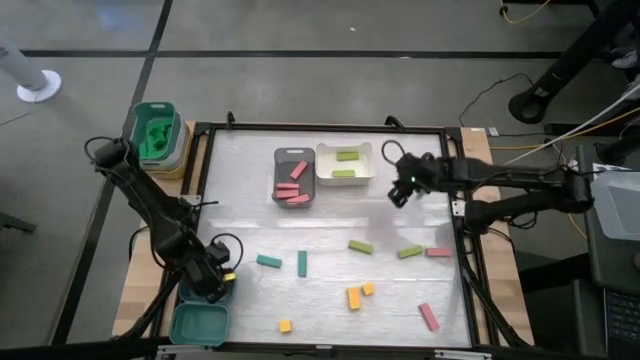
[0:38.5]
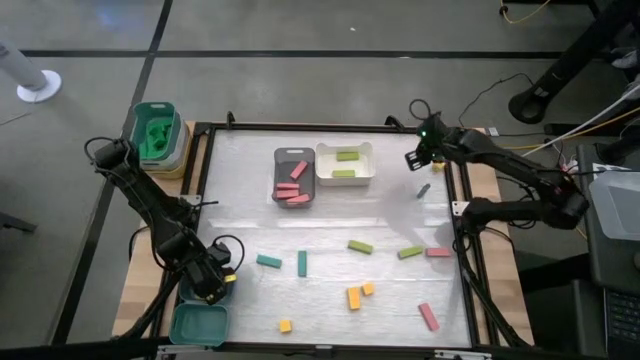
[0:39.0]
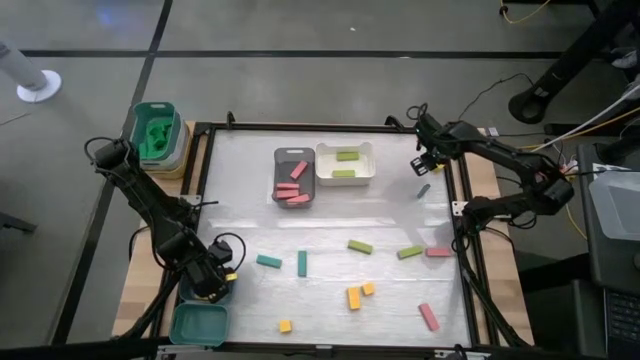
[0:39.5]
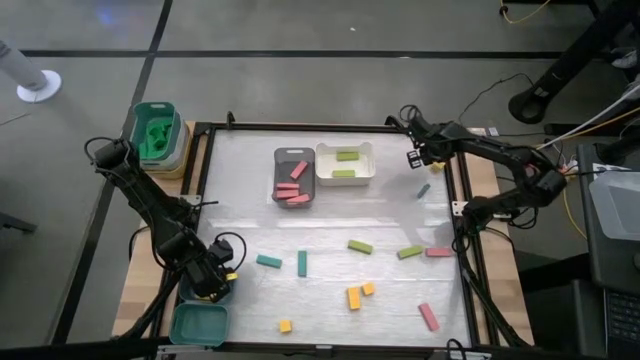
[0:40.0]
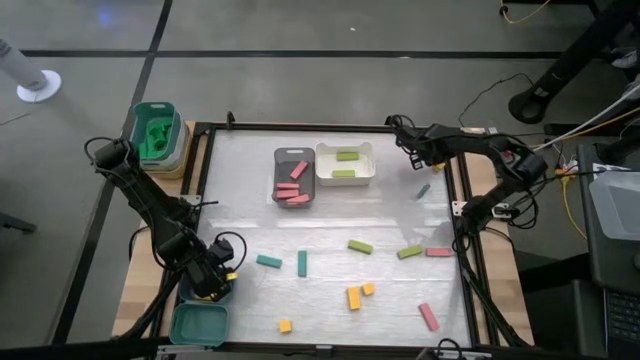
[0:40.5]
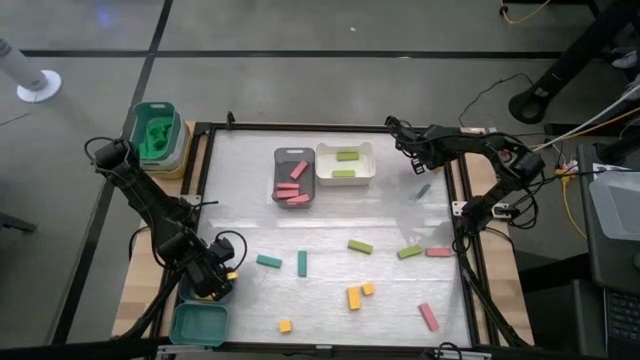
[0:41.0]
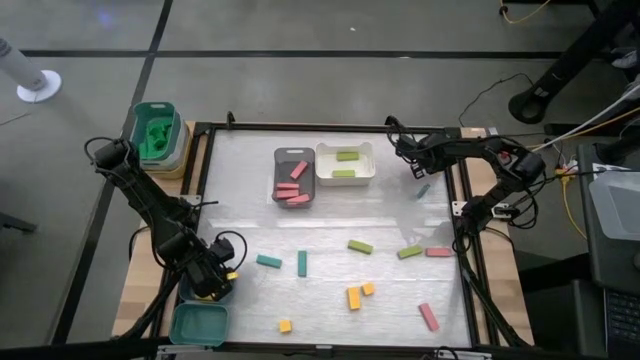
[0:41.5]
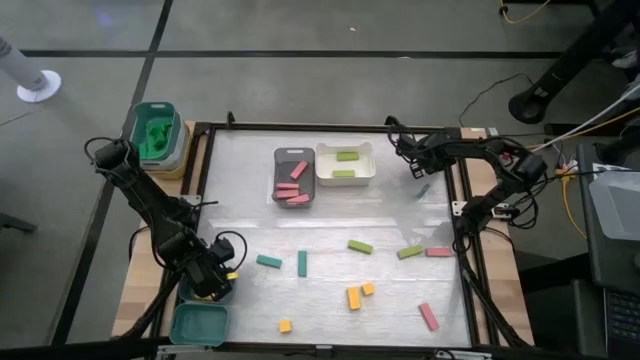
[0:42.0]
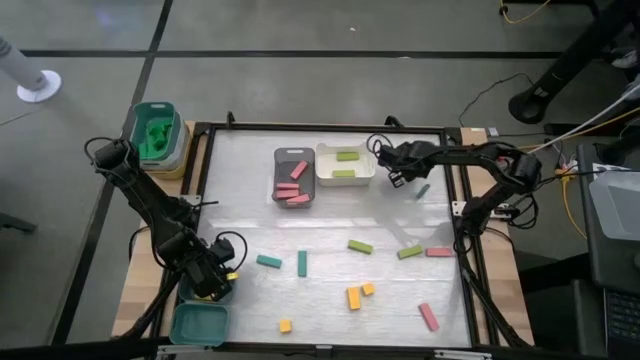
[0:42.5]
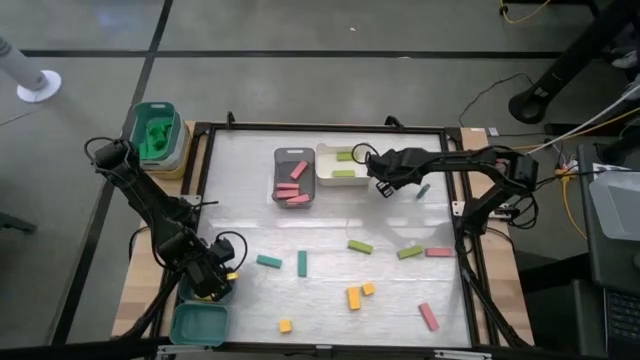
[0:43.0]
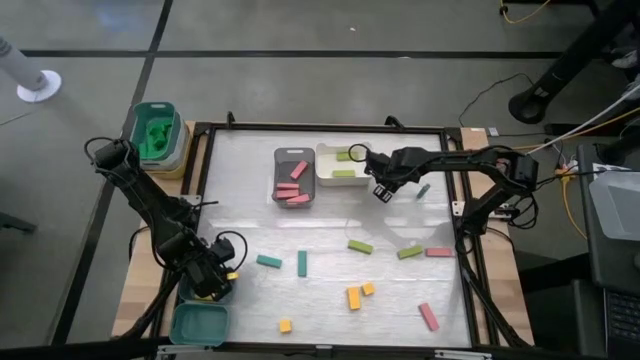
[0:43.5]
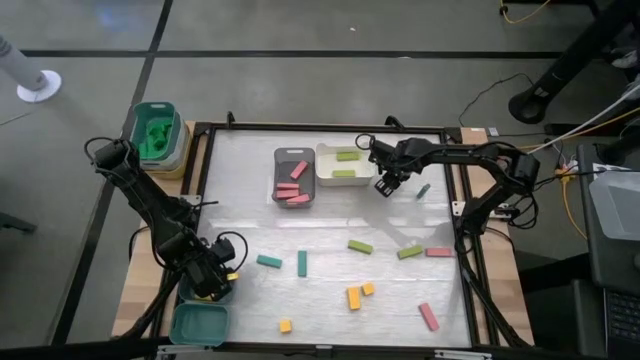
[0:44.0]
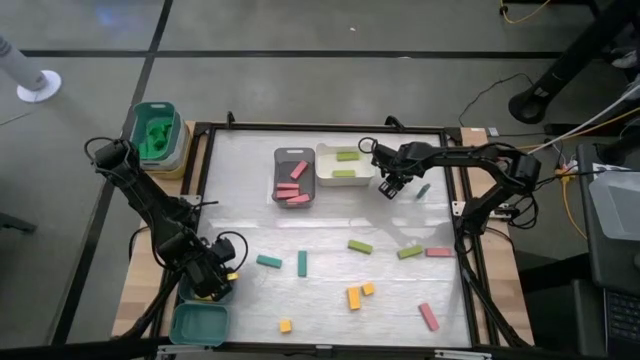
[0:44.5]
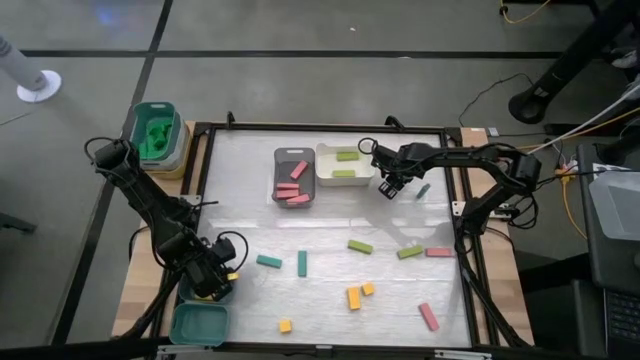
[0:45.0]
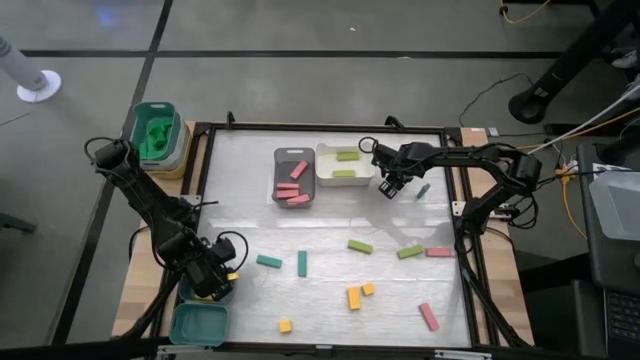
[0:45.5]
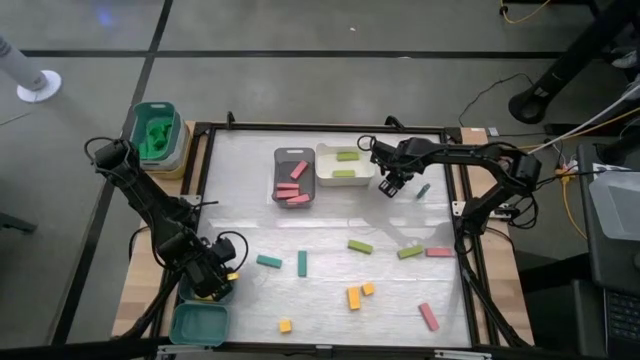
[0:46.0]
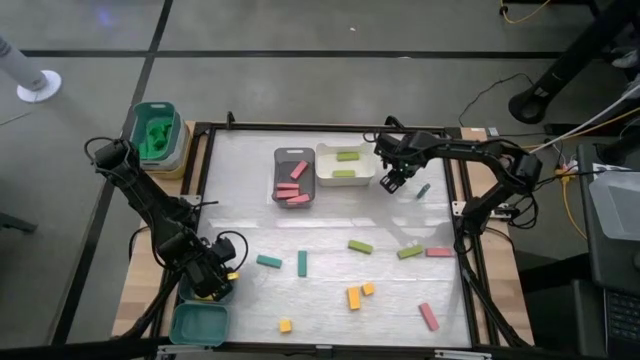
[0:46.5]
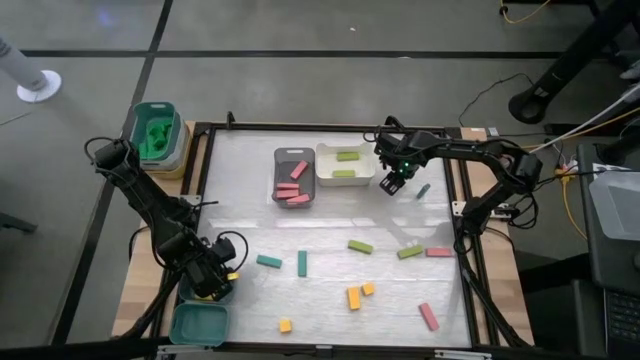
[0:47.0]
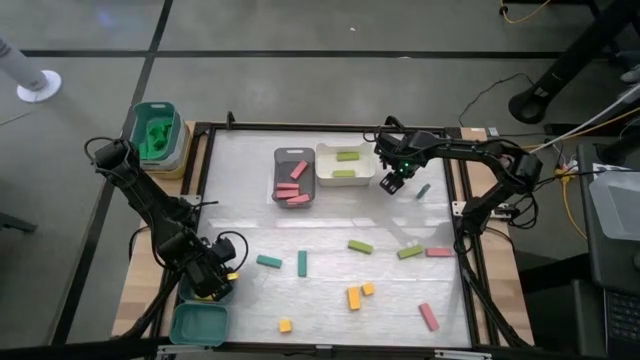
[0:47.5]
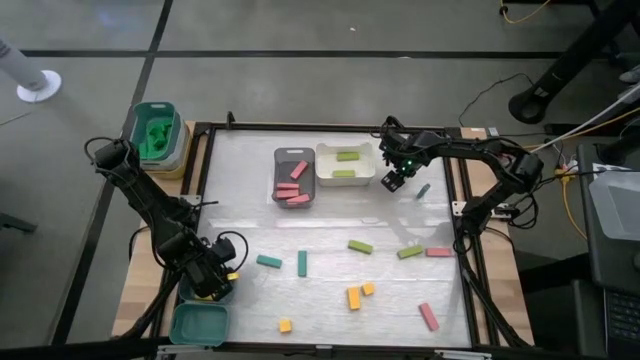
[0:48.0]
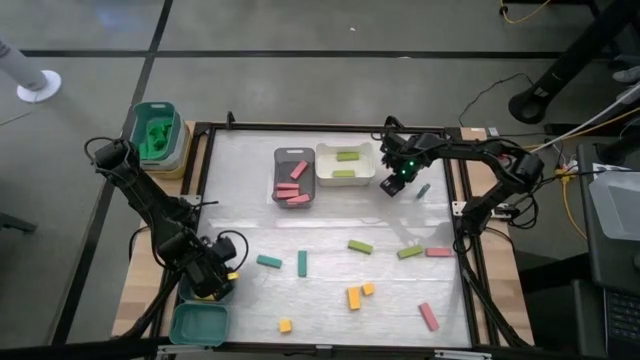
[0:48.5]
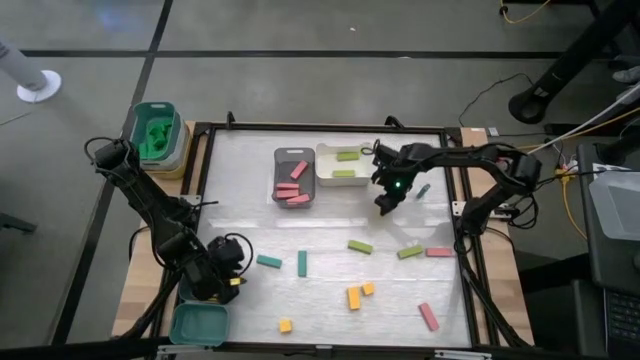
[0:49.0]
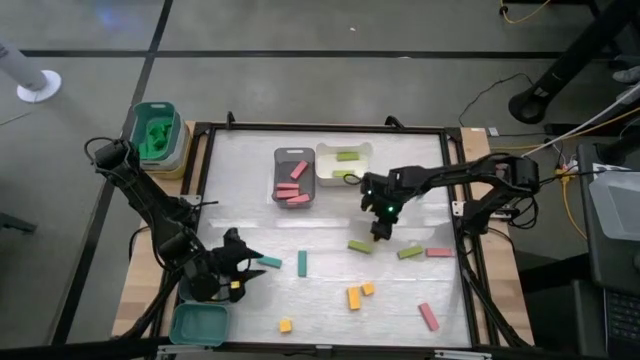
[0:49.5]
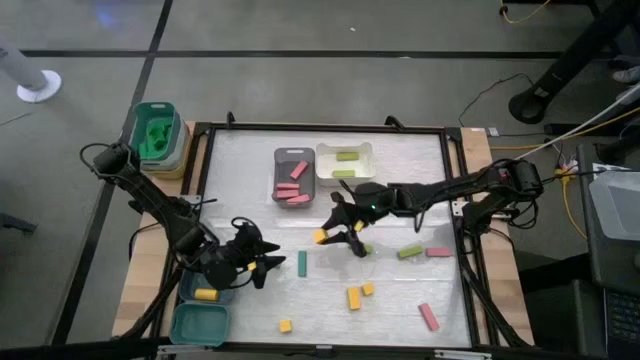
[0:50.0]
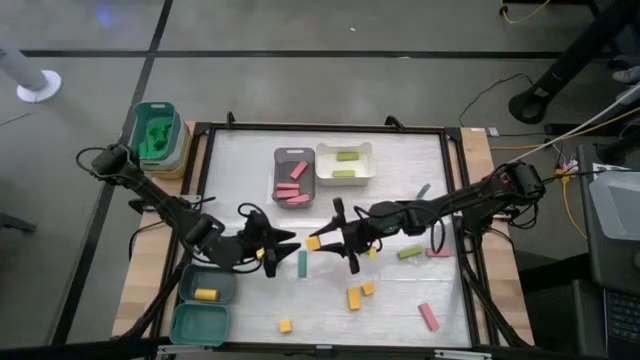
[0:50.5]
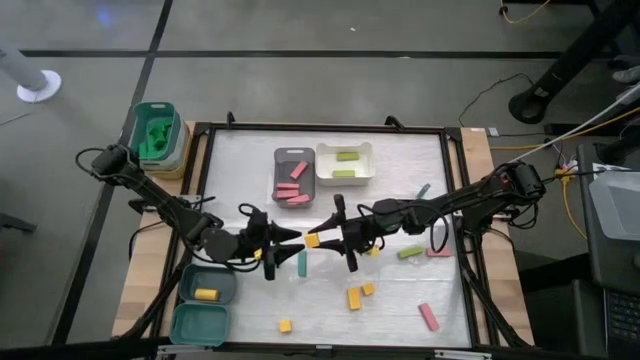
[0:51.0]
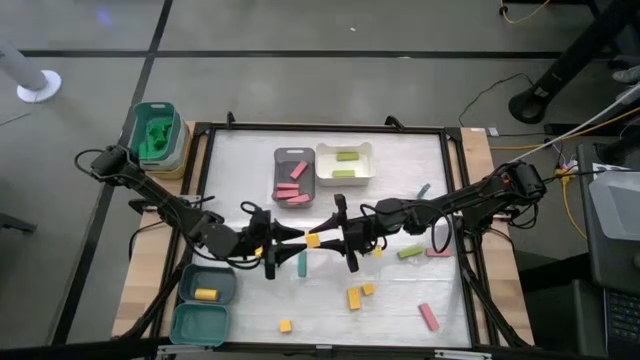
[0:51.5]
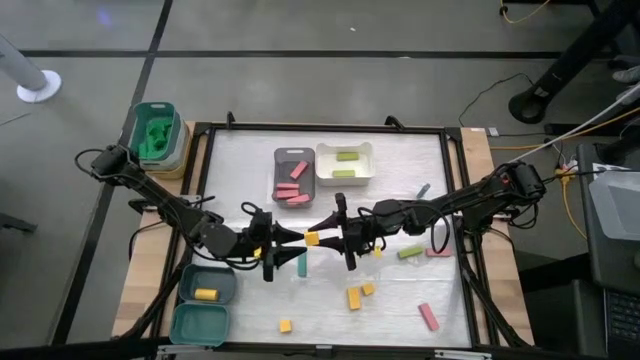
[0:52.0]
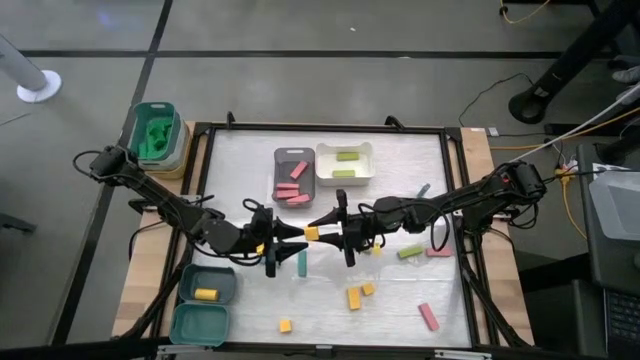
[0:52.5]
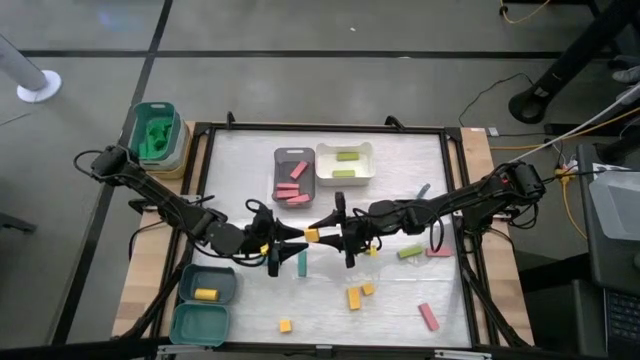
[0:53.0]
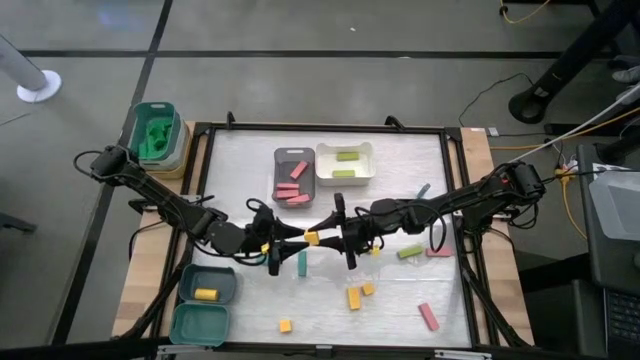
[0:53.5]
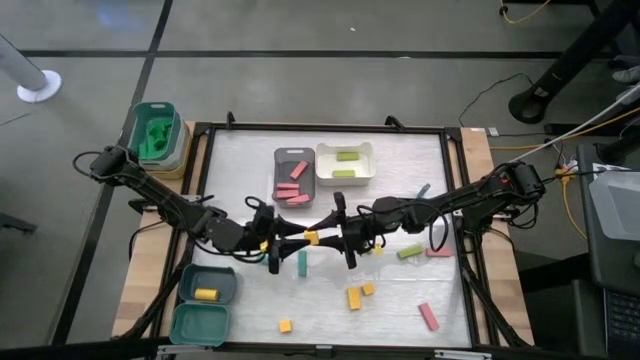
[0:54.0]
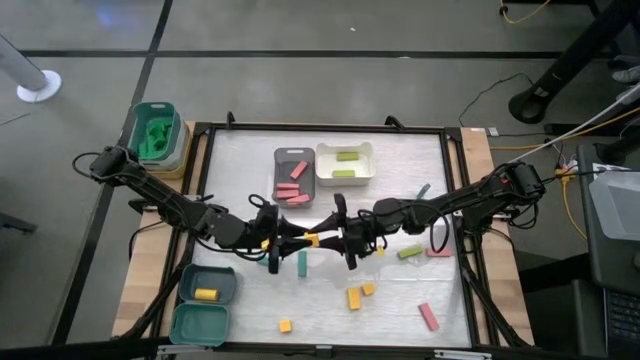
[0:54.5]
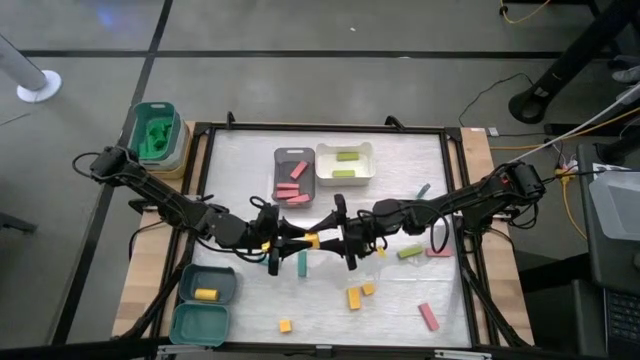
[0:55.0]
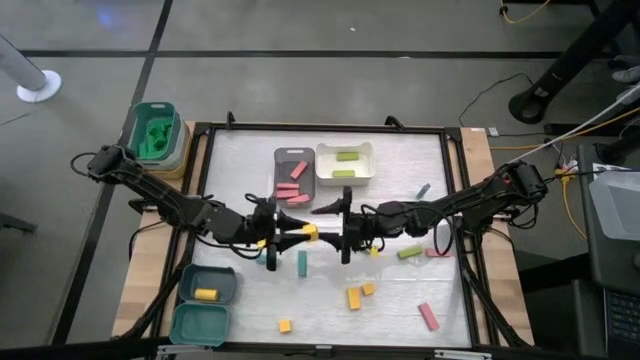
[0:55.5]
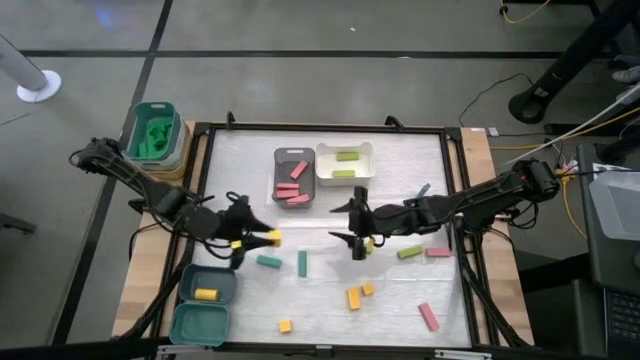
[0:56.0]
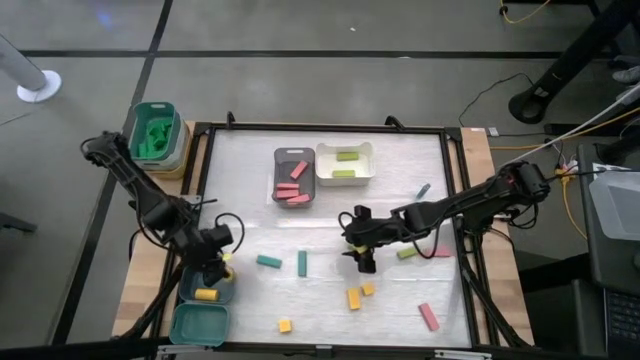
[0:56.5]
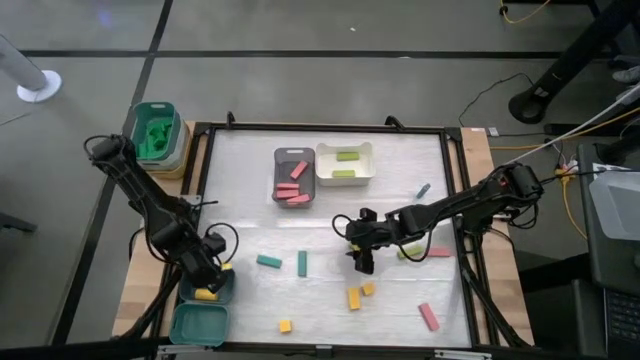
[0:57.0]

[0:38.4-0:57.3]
Task: Sort blocks
Put the yellow block into the blue bin

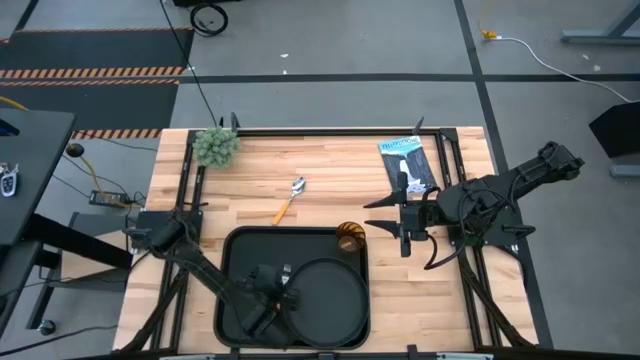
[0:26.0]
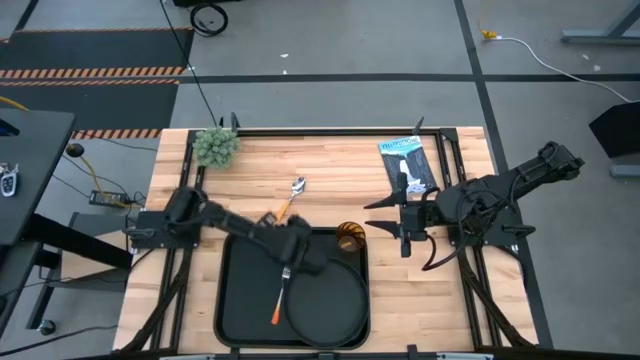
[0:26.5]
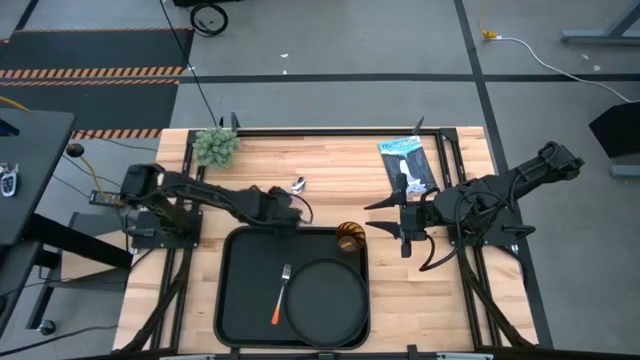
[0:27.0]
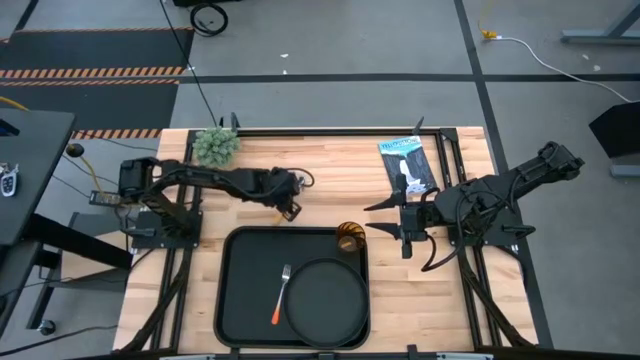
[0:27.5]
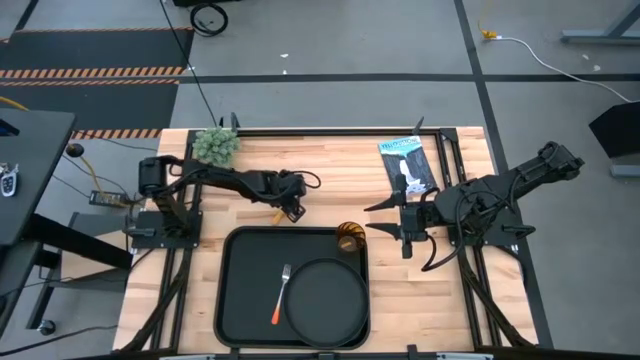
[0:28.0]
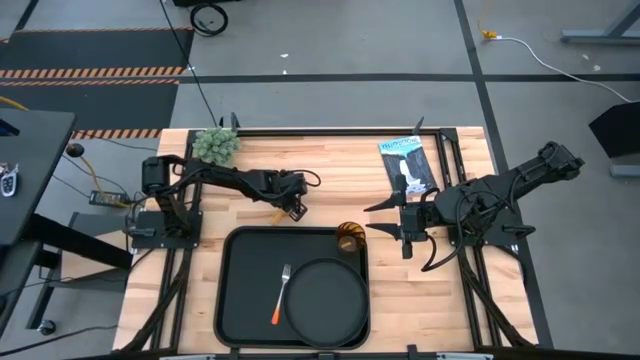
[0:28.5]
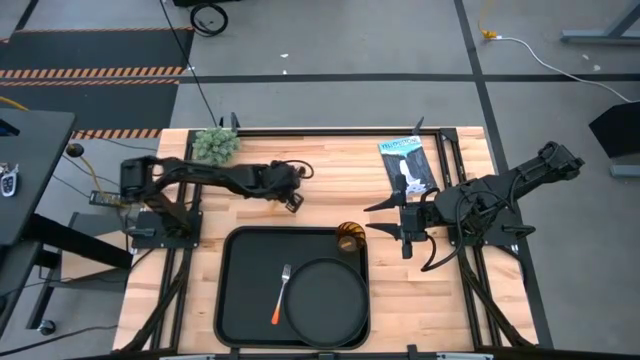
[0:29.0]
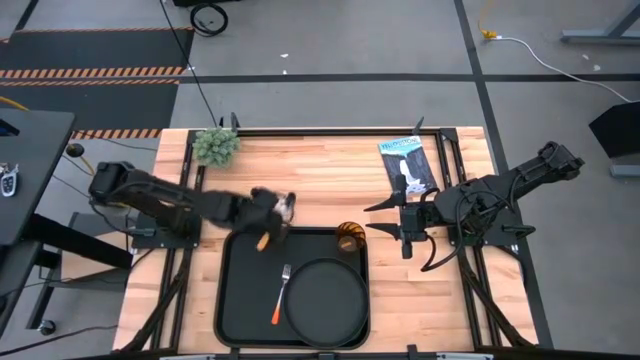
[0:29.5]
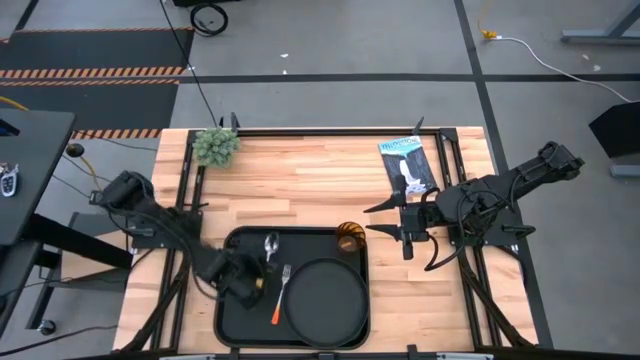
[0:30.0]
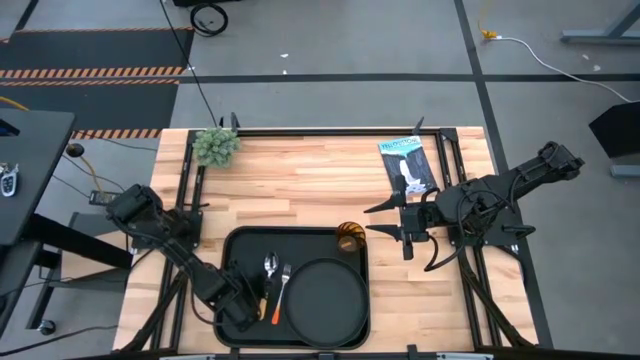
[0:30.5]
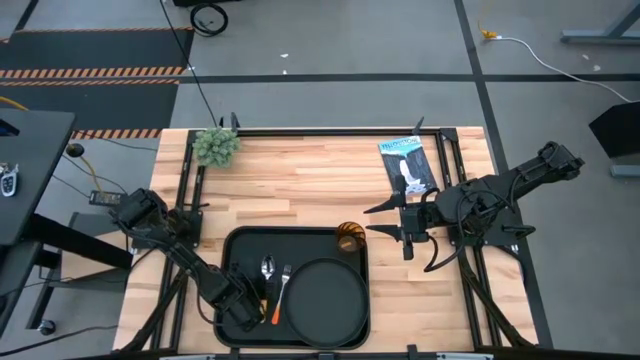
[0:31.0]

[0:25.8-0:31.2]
Task: Pick and place plate/cup/fork/spoon on tray
Put the orange spoon on the black tray beside the orange fork
